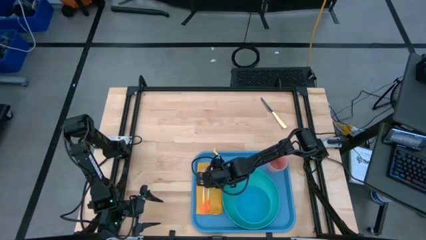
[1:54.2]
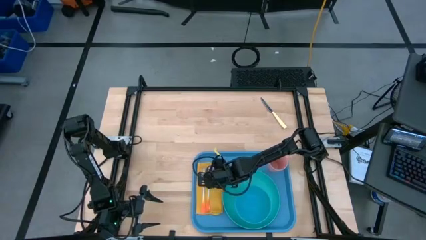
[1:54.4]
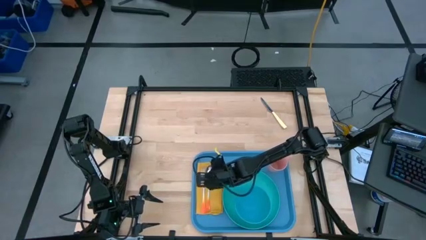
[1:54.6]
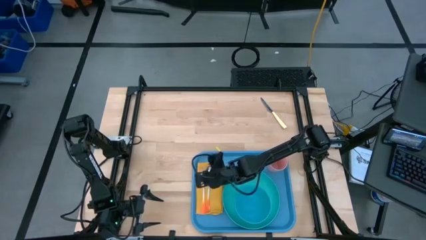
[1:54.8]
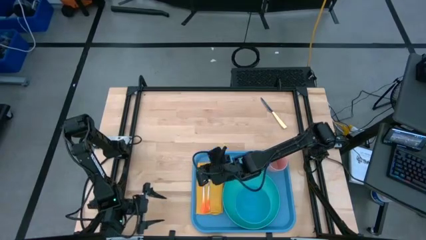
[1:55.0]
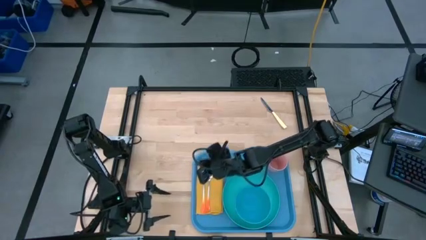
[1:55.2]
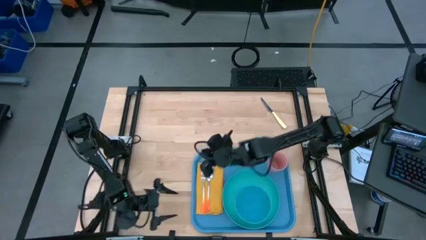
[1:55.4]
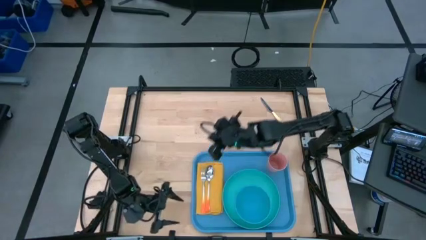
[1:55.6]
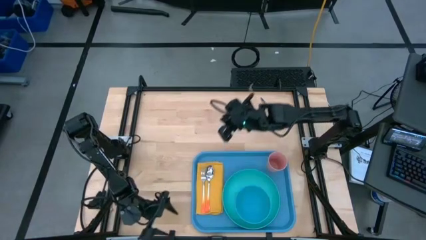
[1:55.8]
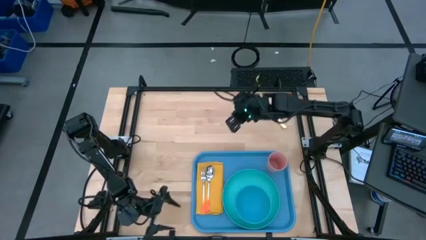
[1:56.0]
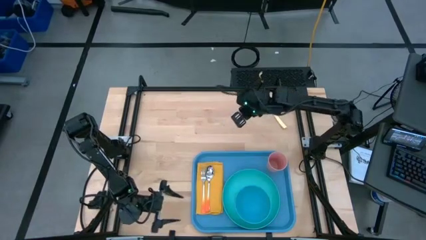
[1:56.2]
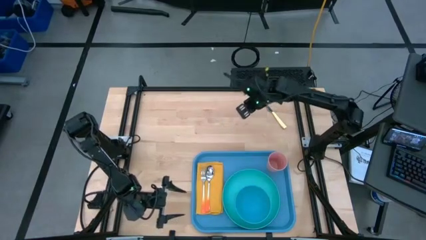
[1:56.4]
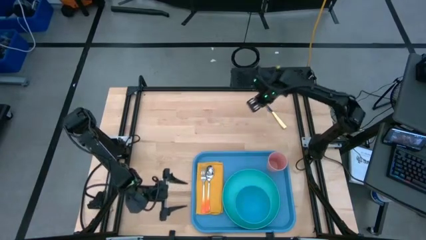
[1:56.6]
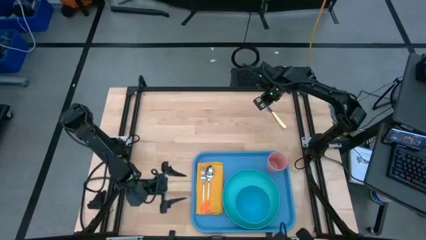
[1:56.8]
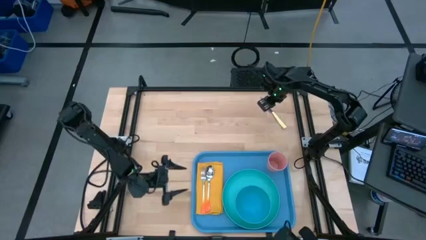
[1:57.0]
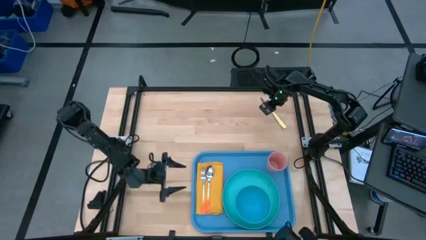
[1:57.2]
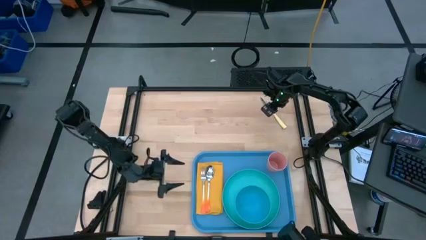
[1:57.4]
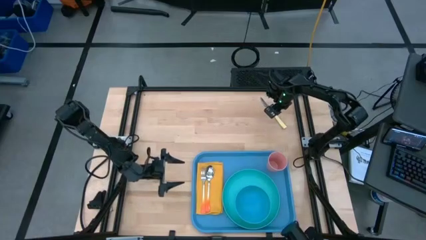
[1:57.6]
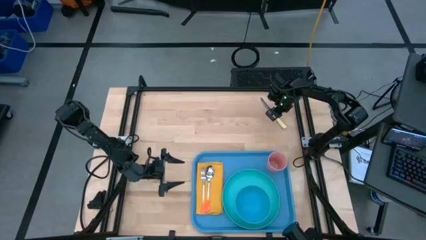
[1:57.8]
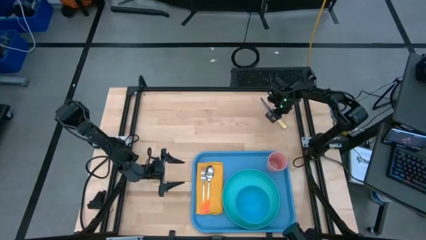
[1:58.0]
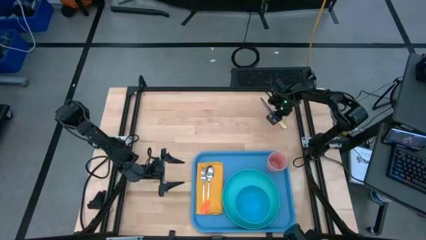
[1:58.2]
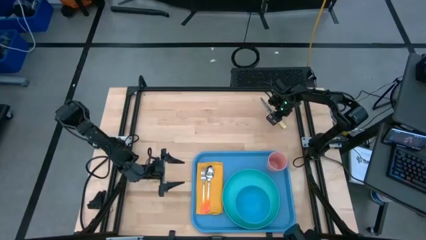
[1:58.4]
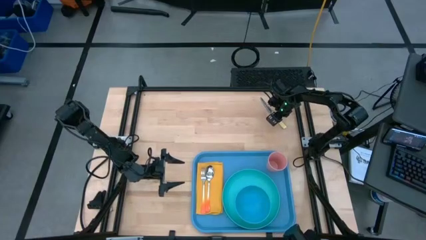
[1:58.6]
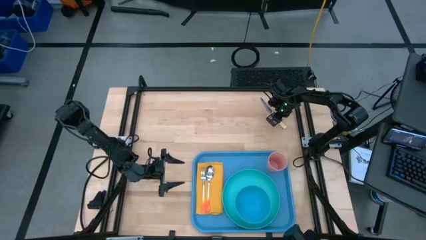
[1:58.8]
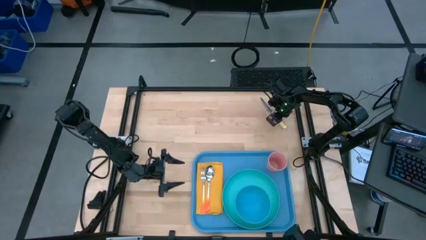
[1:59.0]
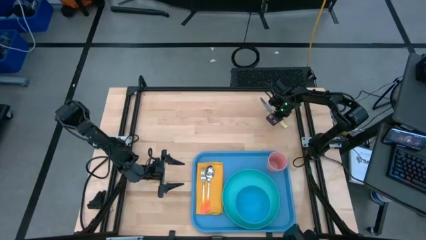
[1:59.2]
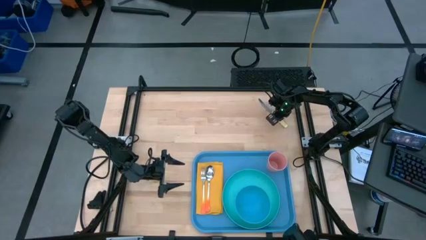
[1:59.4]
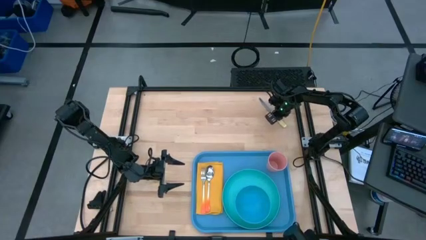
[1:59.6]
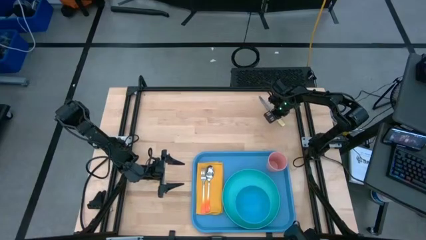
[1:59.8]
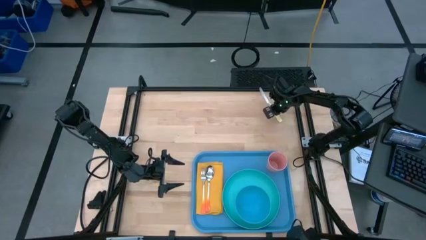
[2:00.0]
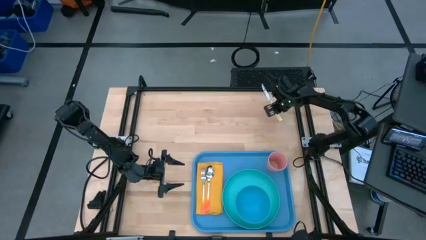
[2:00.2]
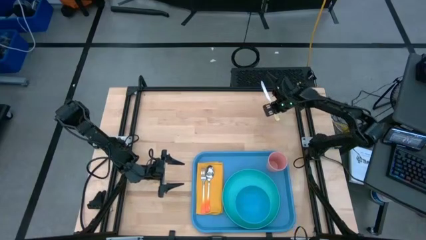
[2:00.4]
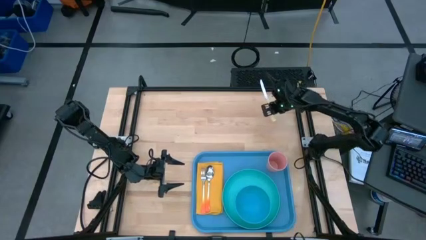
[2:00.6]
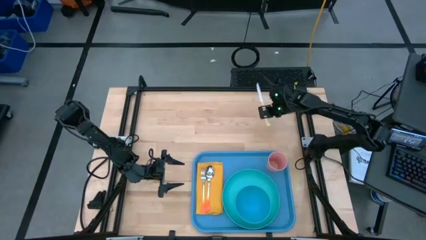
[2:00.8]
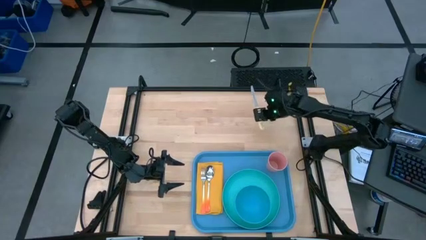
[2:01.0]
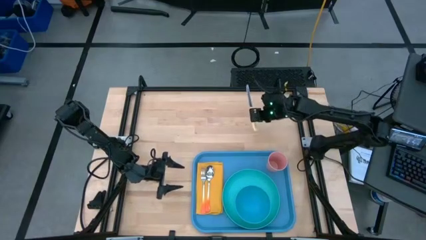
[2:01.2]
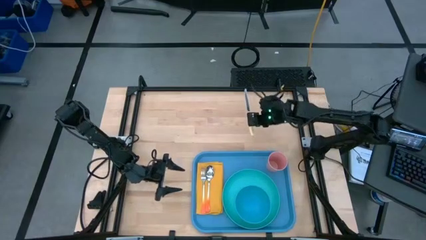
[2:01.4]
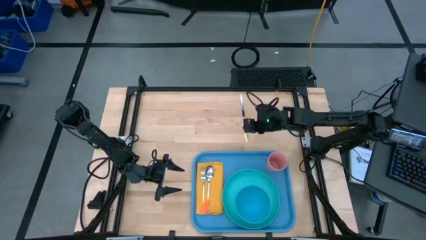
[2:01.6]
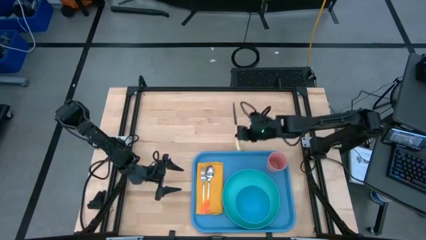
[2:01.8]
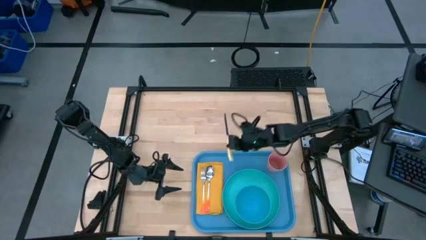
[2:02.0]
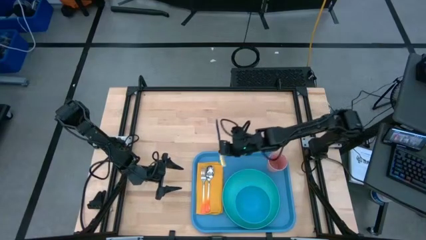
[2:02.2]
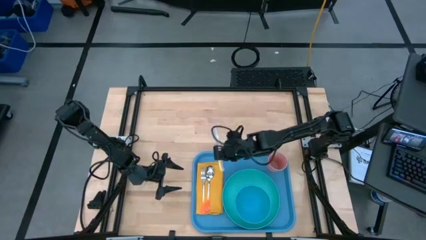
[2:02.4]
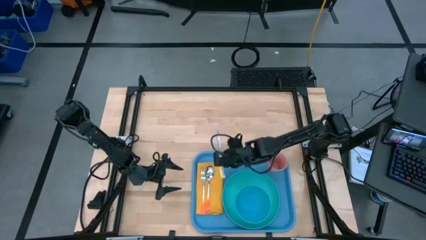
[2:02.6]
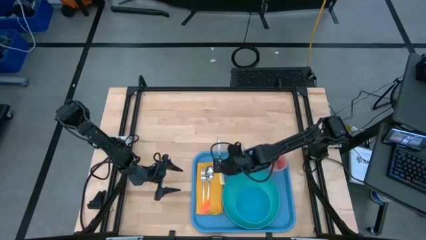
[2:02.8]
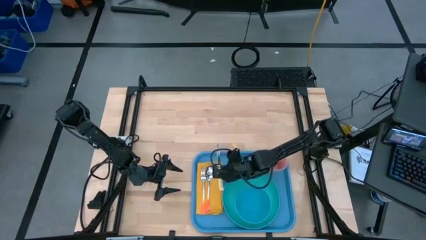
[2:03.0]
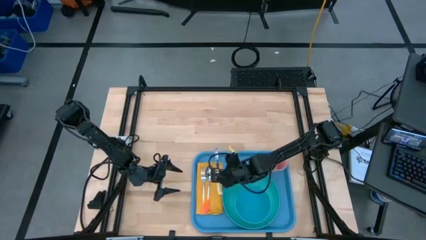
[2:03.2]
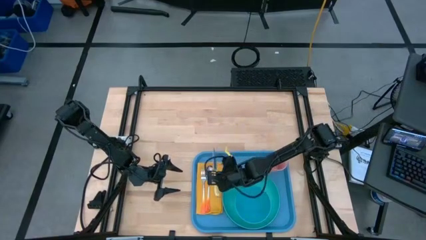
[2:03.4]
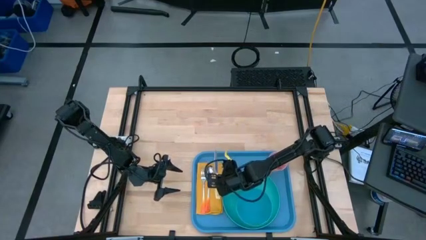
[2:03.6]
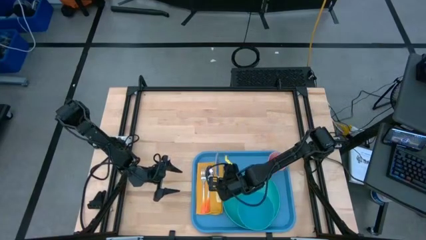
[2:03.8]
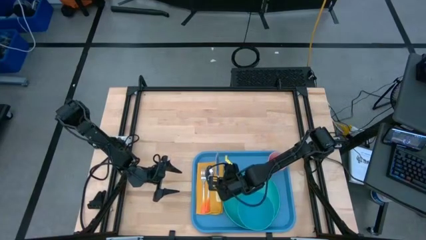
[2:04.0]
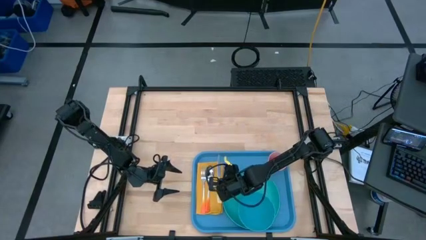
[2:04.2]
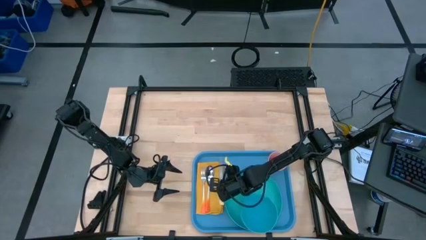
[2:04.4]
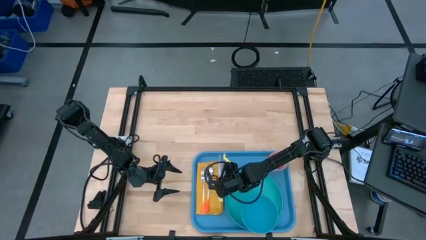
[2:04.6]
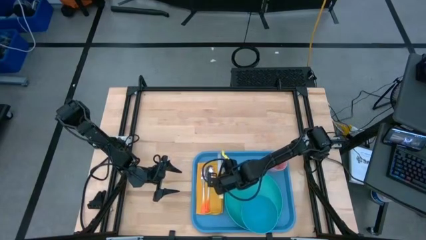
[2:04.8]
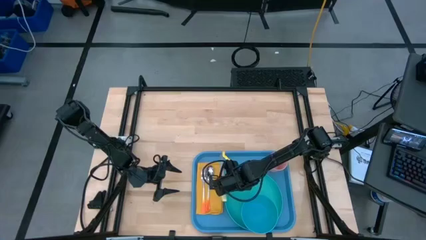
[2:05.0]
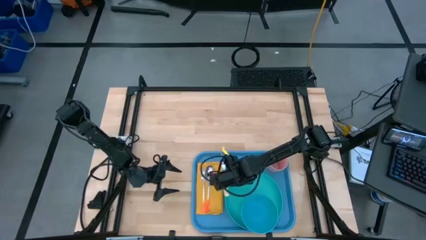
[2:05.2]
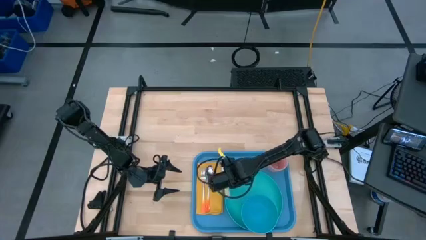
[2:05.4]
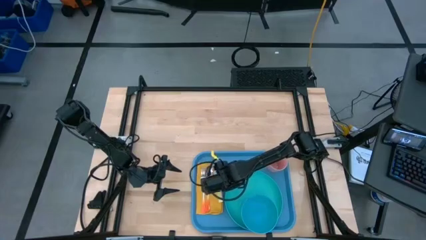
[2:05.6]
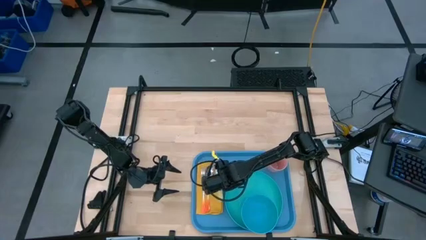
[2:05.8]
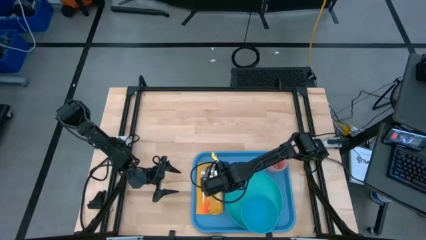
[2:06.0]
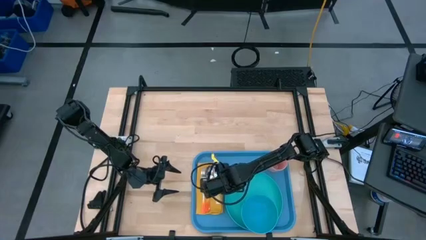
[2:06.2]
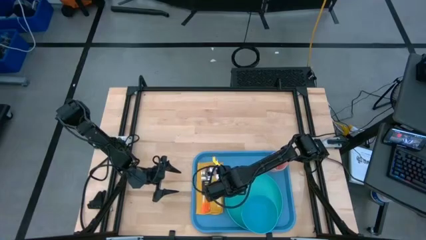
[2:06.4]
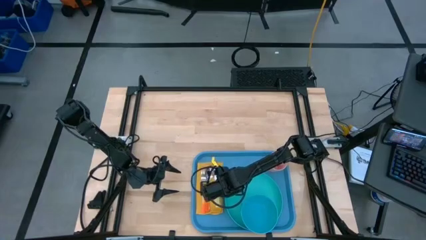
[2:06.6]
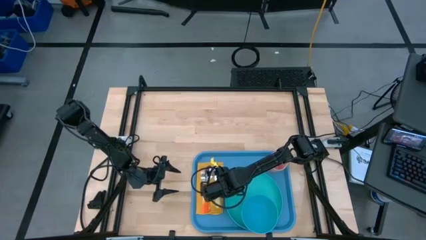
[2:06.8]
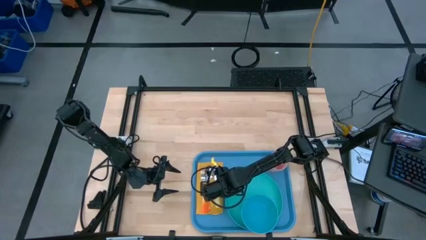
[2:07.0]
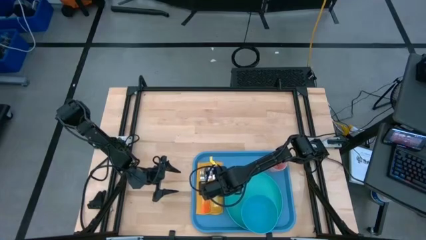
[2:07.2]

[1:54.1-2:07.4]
Task: Set up tray
Put the yellow knife on the orange napkin to the right of the orange spoon

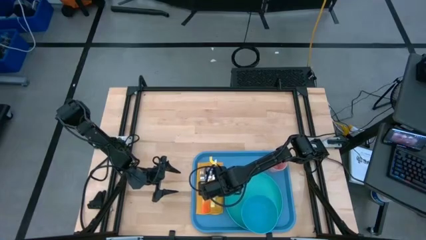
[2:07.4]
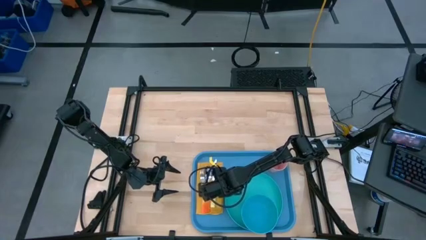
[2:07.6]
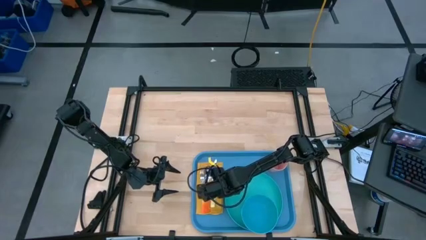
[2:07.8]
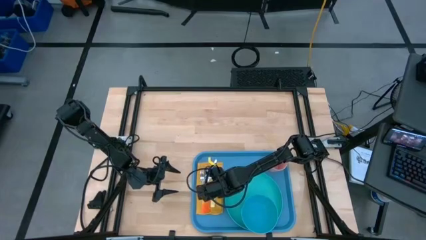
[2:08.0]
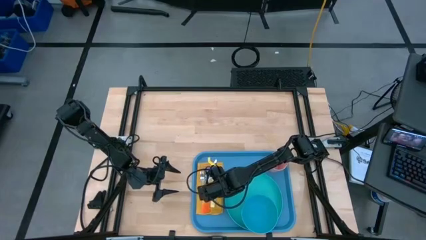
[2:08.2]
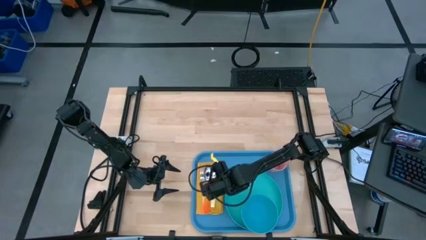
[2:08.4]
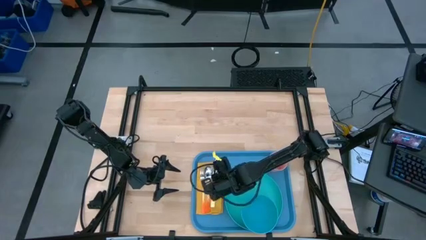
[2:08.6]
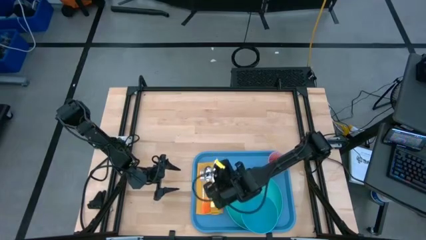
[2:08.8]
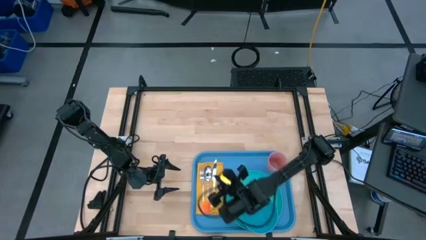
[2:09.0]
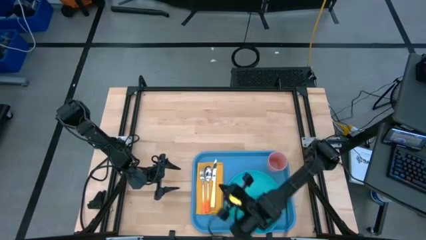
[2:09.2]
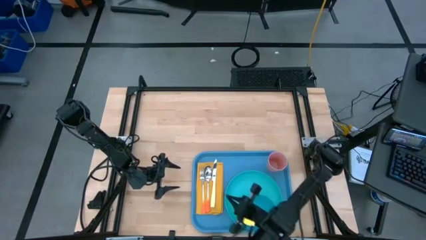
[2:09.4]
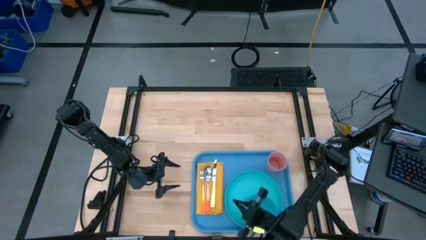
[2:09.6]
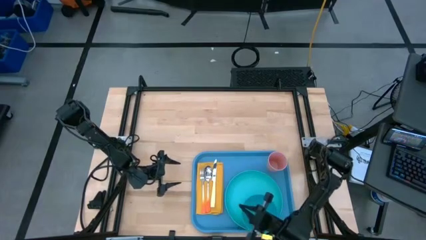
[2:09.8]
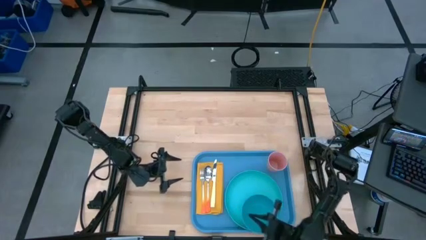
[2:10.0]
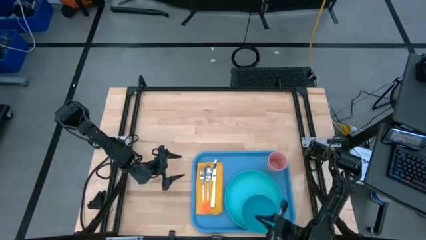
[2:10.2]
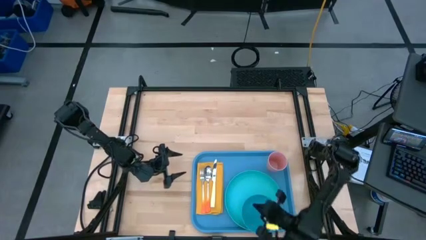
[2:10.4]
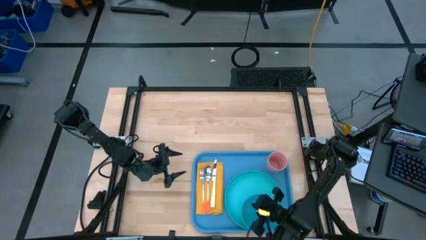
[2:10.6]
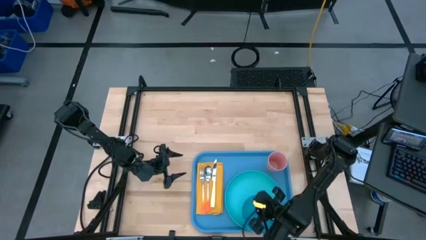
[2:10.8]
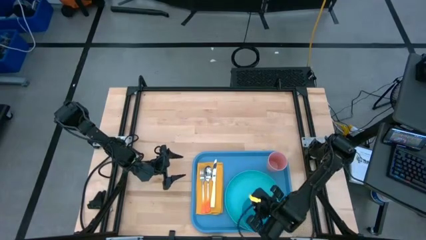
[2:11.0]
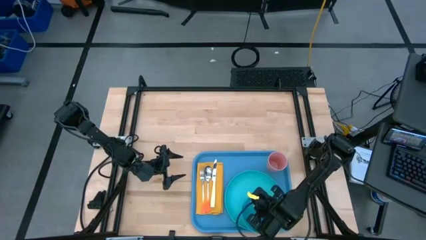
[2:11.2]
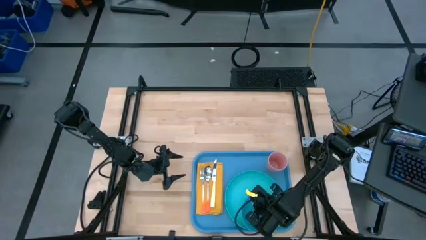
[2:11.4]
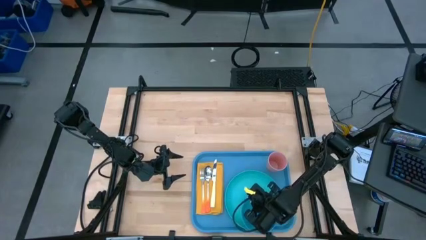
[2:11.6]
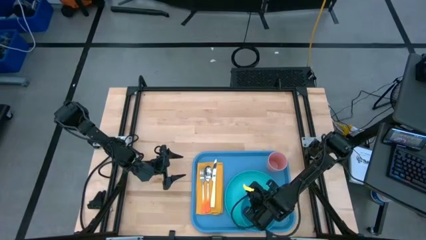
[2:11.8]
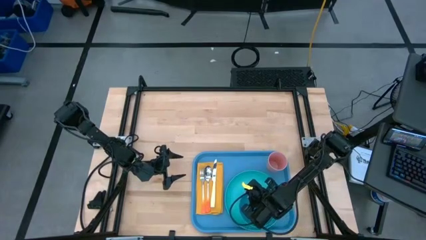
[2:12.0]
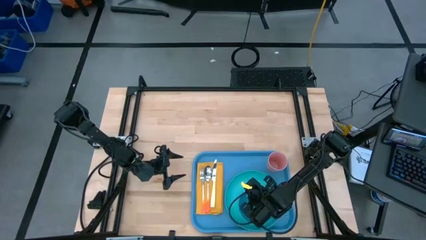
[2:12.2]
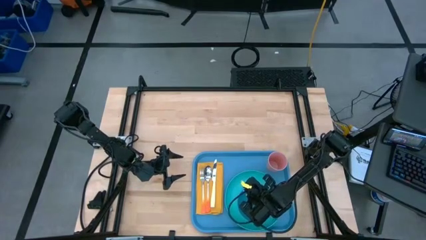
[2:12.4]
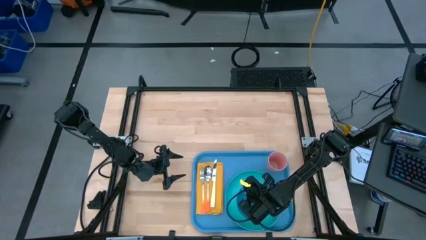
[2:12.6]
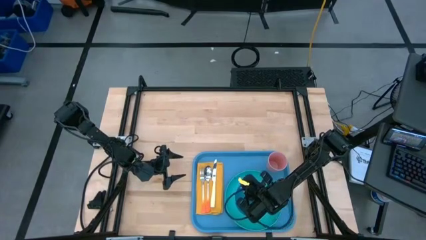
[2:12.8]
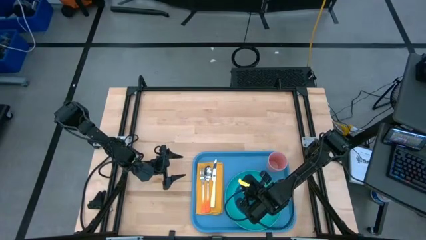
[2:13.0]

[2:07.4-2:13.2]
Adjust the blue bowl on the blue plate
